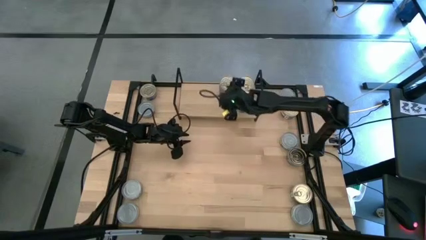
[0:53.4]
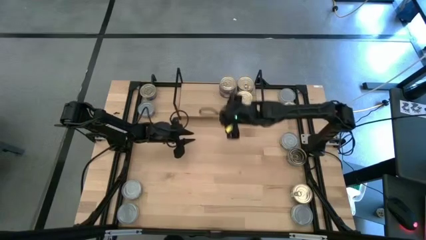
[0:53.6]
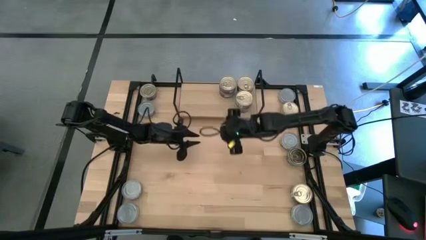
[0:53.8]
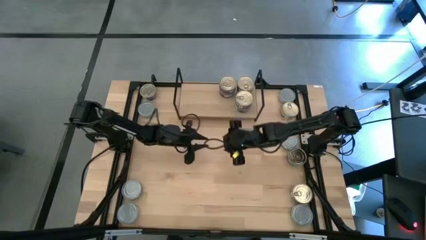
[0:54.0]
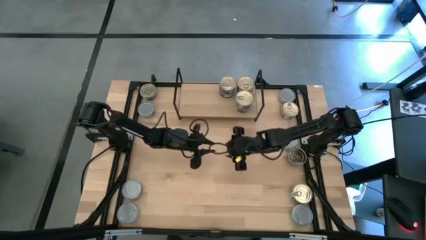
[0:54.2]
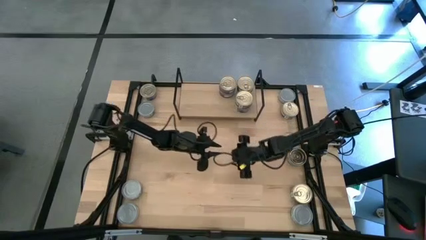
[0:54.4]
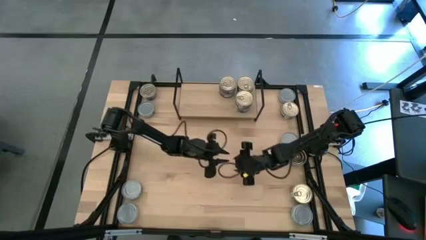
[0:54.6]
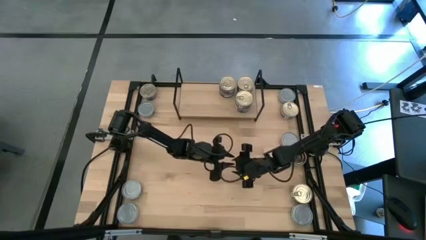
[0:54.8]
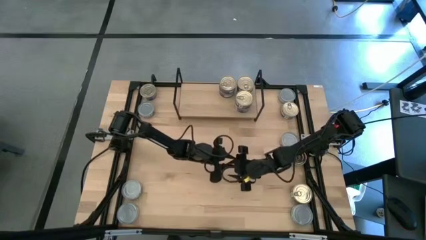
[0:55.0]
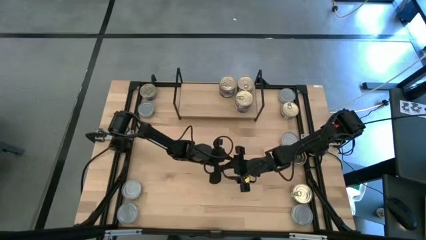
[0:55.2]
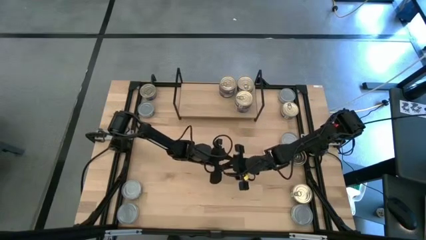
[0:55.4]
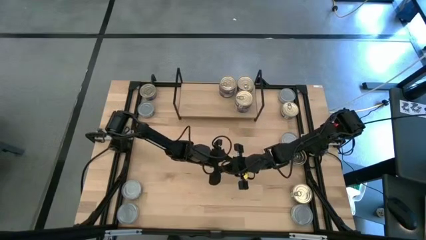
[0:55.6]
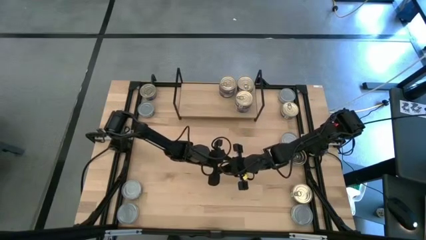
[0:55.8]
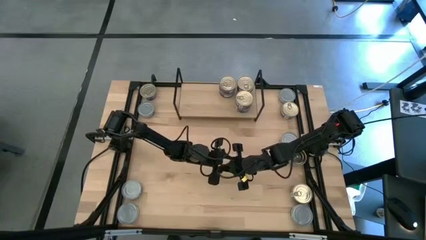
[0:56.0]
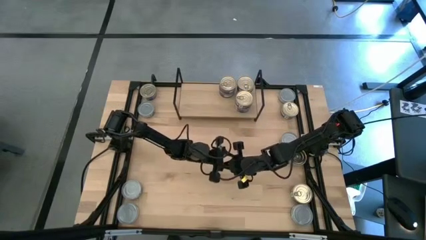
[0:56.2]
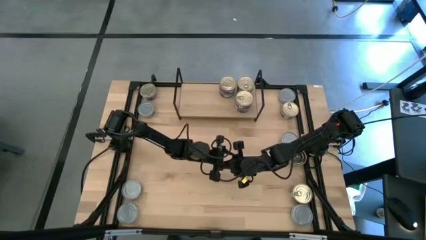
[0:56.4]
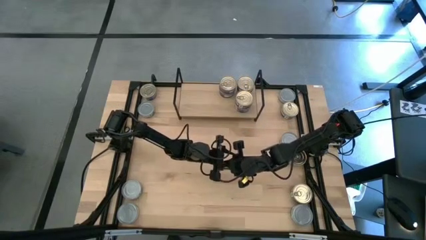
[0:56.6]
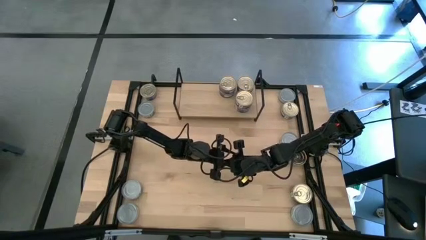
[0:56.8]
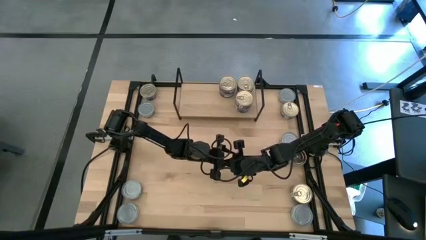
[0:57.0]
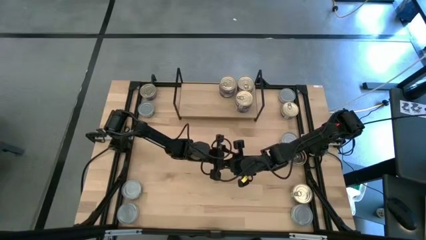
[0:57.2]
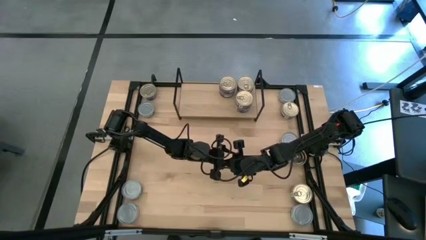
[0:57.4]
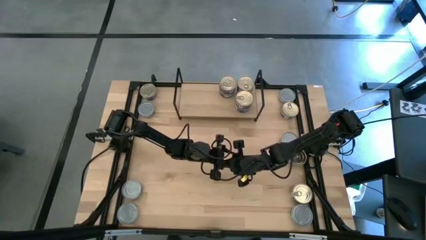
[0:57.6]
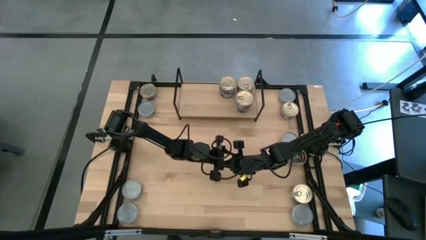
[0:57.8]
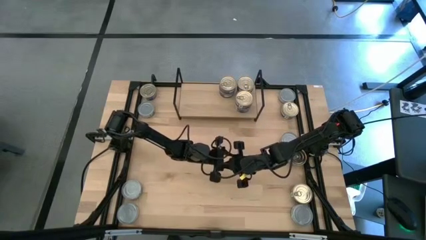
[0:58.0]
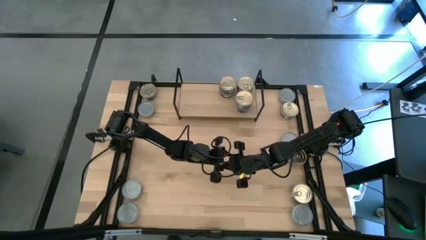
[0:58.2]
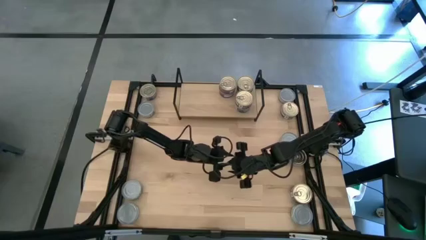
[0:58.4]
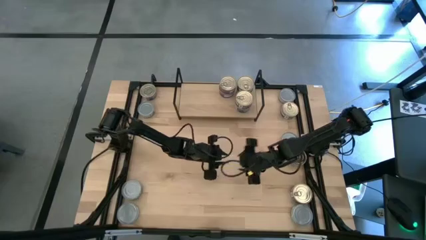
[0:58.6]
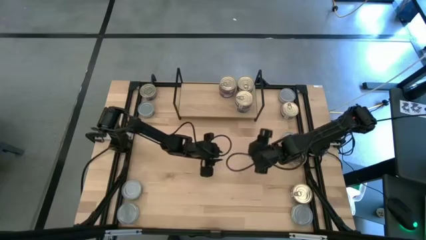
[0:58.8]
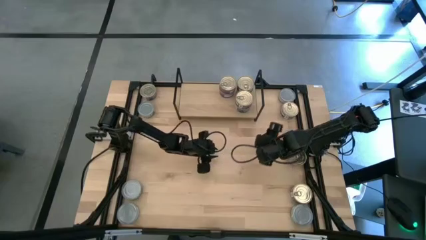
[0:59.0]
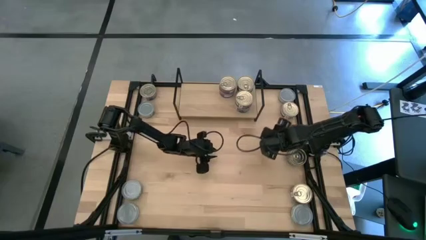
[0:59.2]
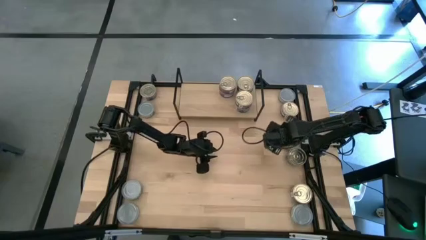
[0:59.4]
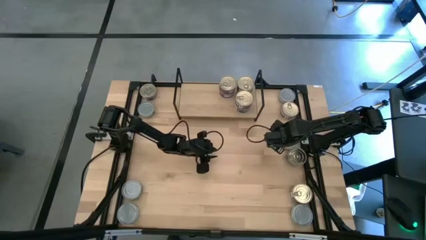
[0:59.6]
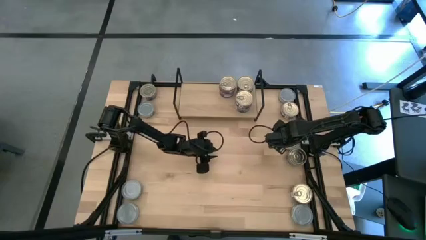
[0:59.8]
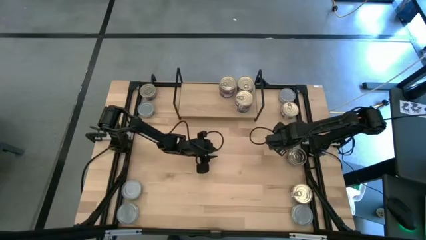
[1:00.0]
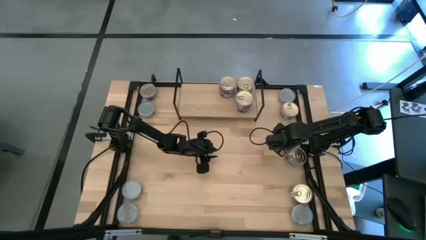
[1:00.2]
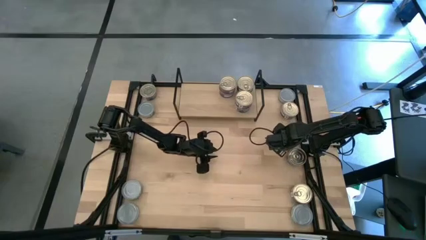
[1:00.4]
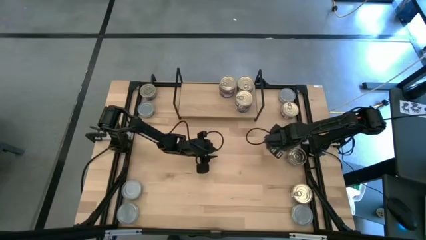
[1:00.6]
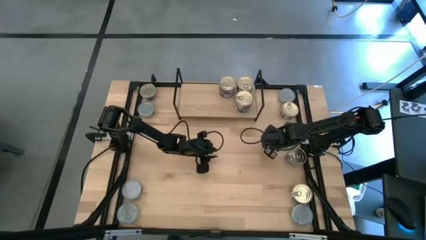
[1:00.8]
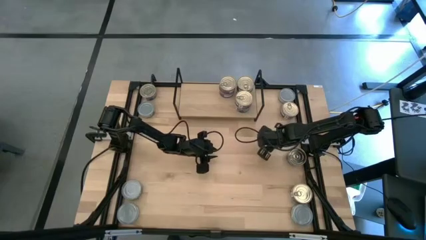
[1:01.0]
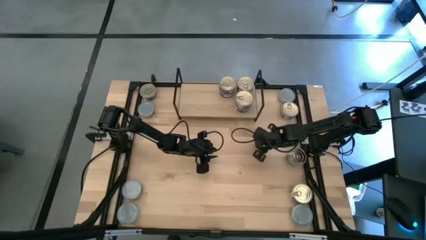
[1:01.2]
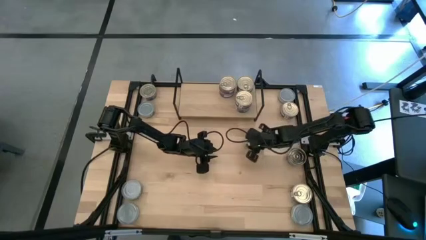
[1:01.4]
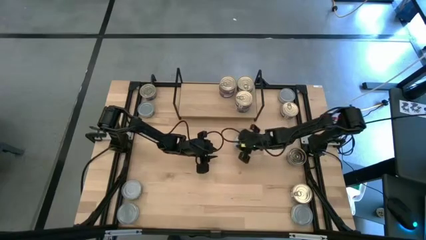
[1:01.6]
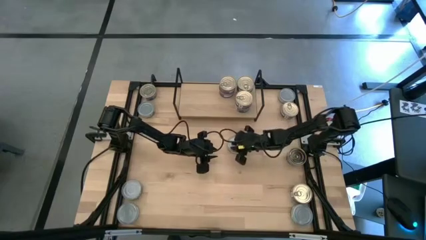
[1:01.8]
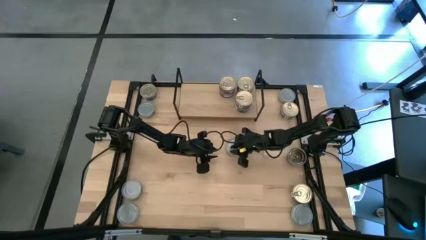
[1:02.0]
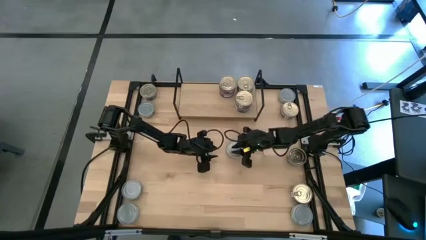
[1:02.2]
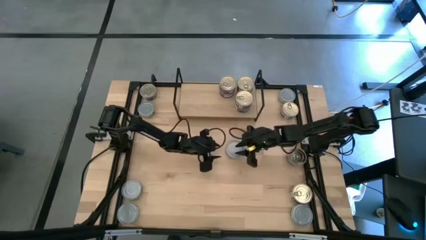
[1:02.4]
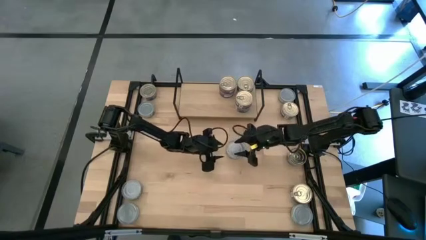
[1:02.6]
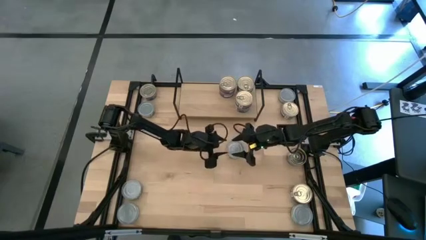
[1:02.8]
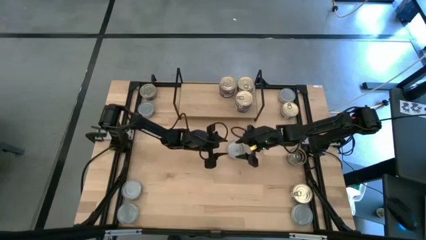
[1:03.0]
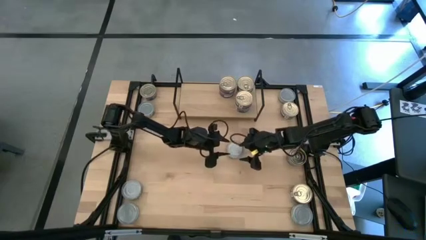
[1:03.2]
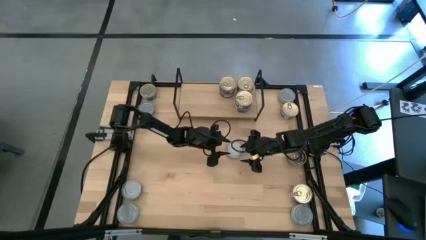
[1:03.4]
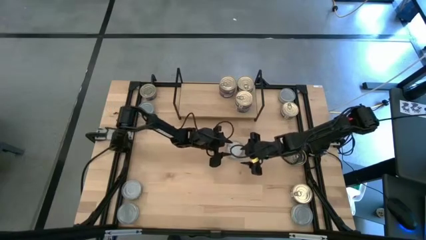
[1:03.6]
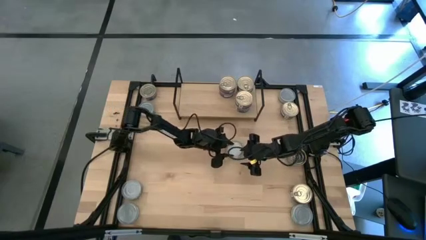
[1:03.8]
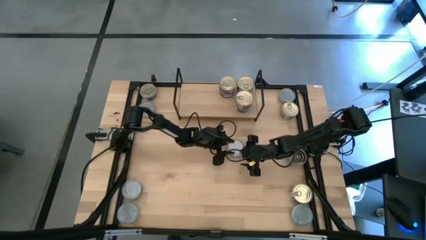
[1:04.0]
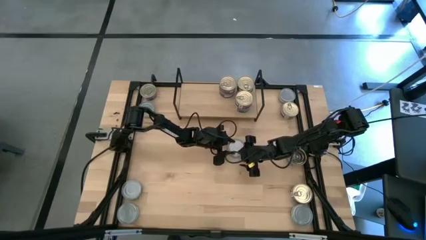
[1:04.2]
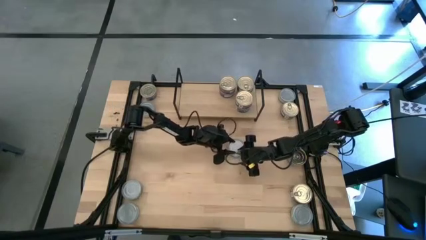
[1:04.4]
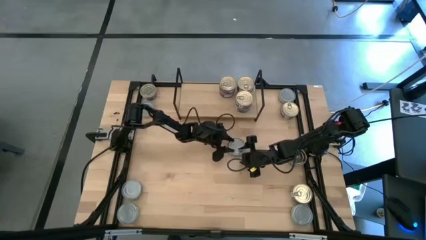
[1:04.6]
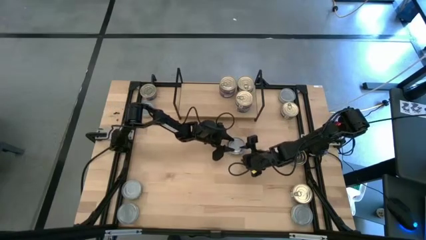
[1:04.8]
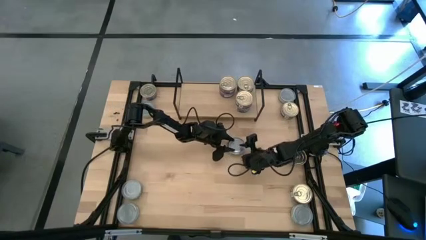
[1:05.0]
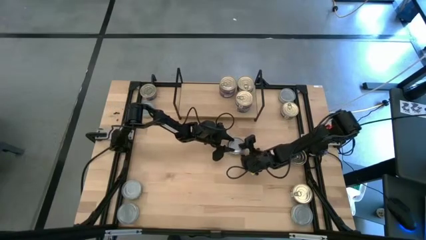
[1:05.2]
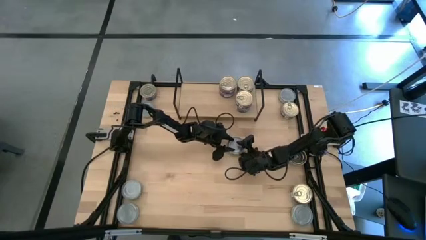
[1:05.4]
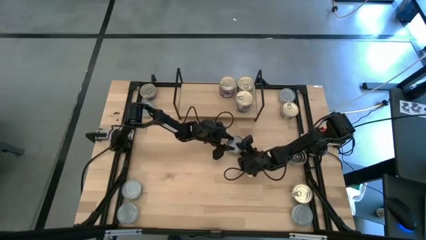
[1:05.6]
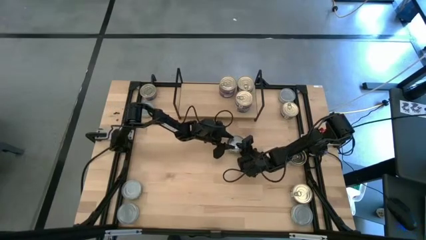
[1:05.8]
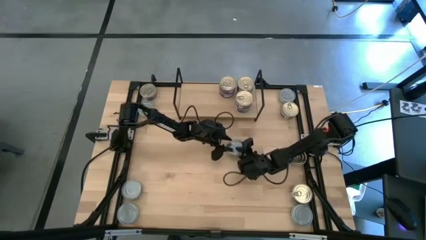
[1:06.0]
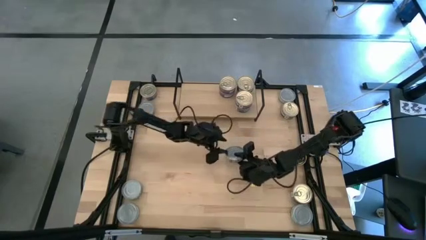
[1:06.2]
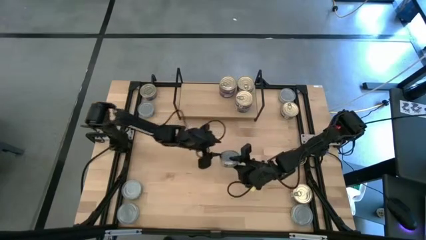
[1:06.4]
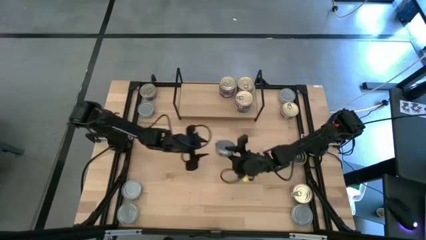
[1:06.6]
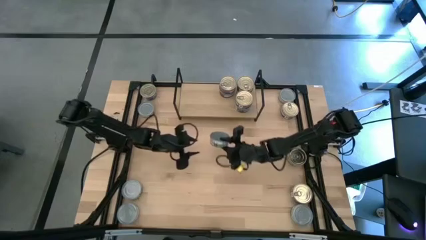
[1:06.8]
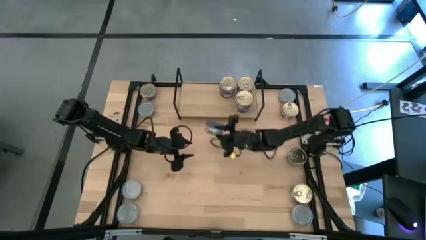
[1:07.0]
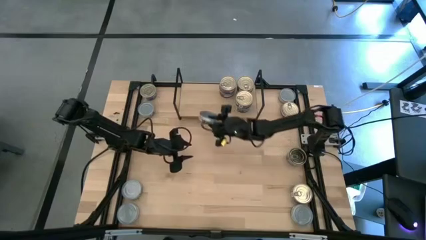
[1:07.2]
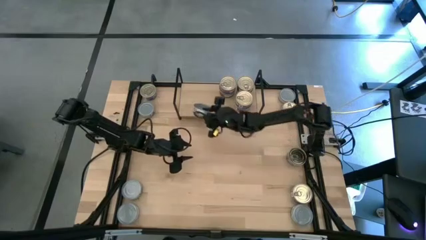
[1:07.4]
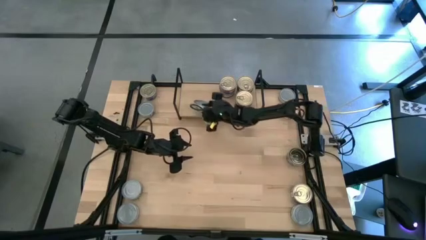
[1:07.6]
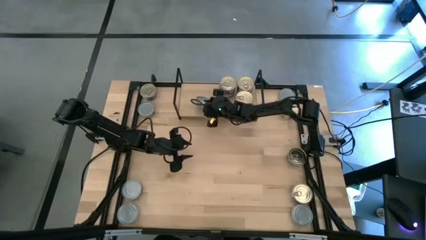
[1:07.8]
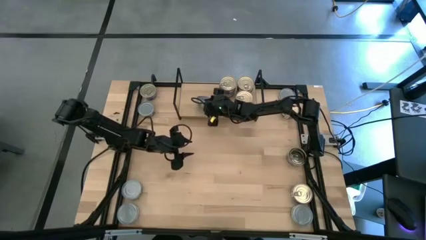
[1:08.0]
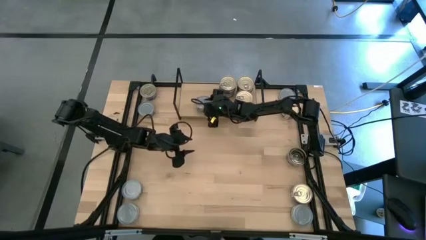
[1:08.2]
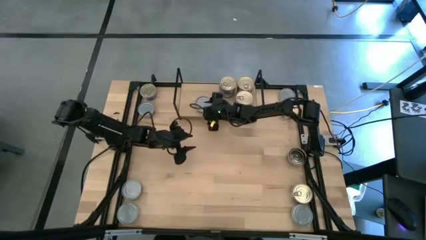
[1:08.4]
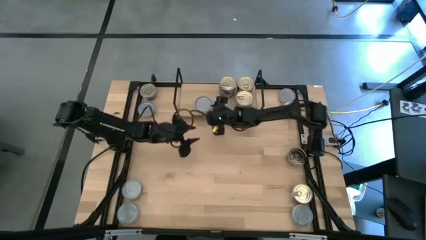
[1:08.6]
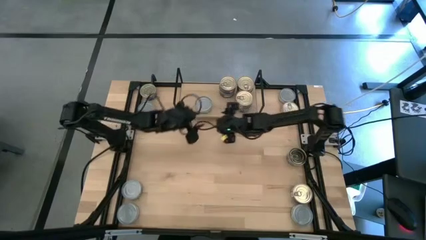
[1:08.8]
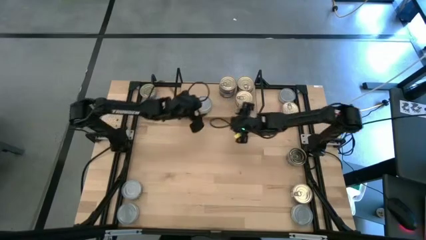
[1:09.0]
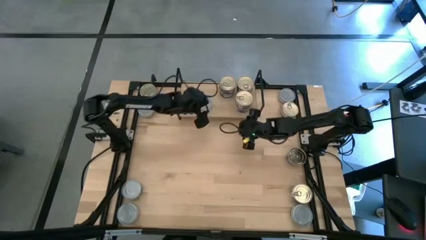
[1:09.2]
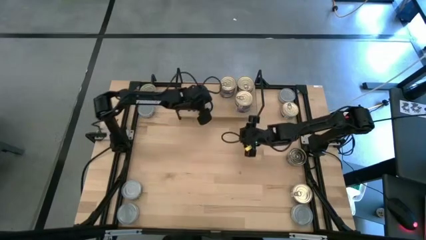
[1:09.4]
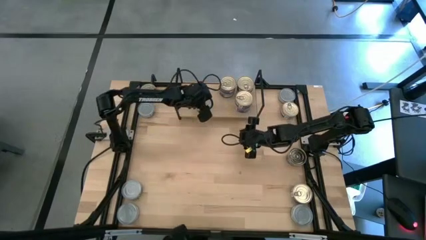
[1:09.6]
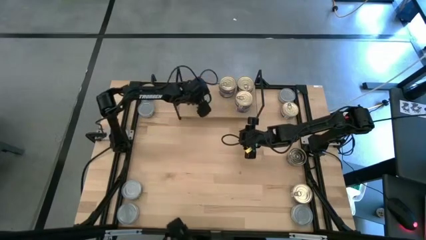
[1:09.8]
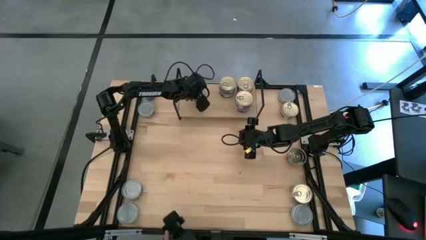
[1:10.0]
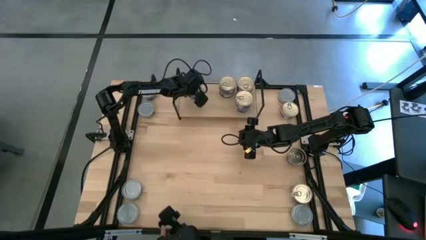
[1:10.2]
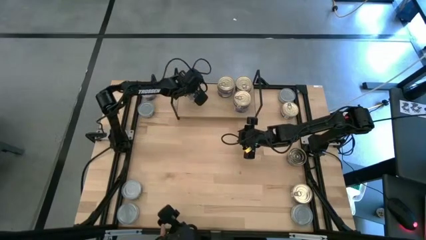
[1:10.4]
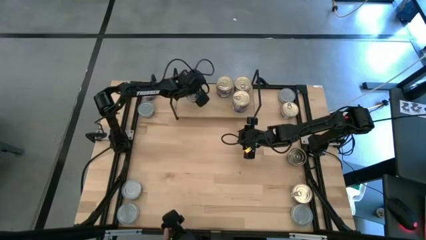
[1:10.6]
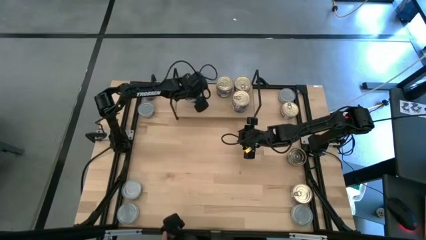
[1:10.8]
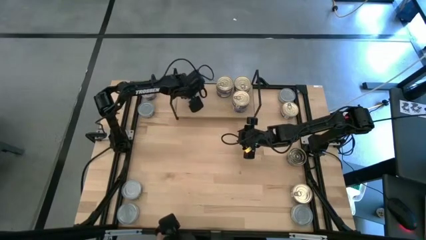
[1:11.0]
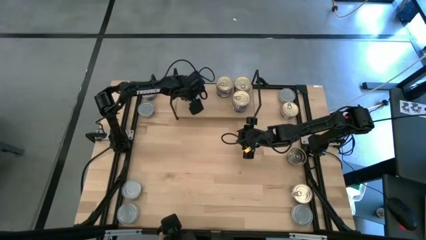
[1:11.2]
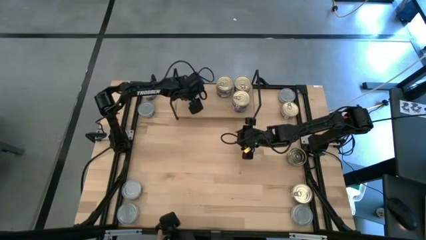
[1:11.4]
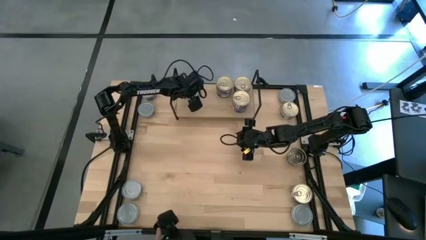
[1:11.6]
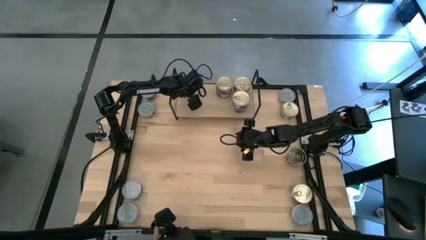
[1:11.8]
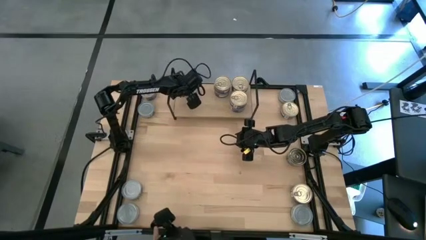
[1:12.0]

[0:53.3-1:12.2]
Task: Stack canned seafood by type on shelf
Put the green and white tuna can on the shelf
